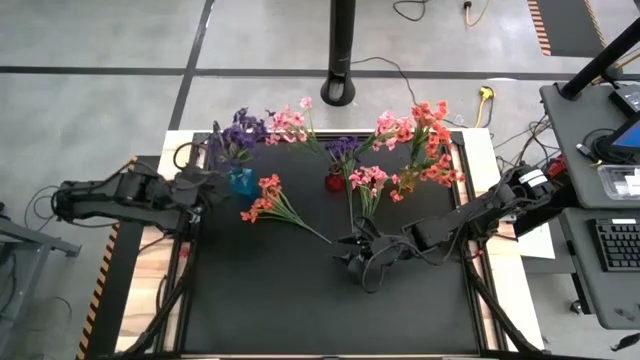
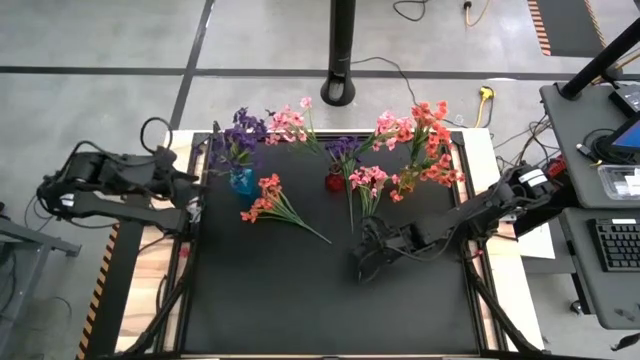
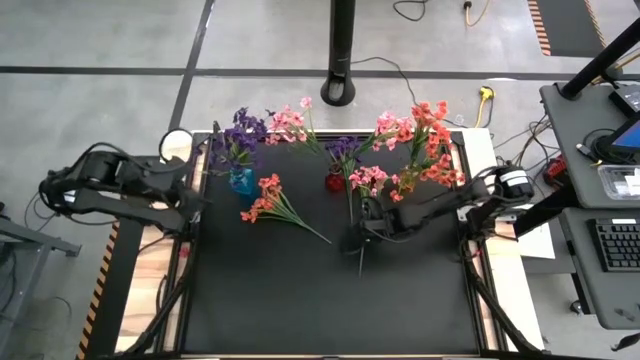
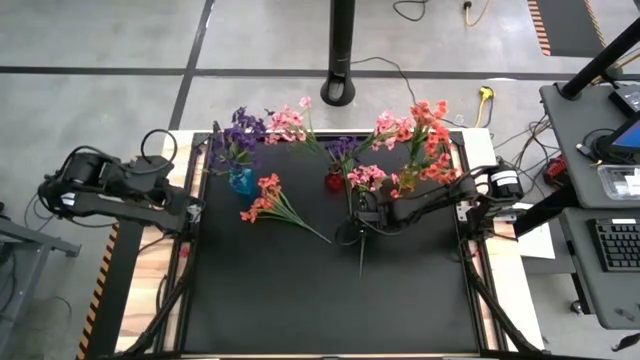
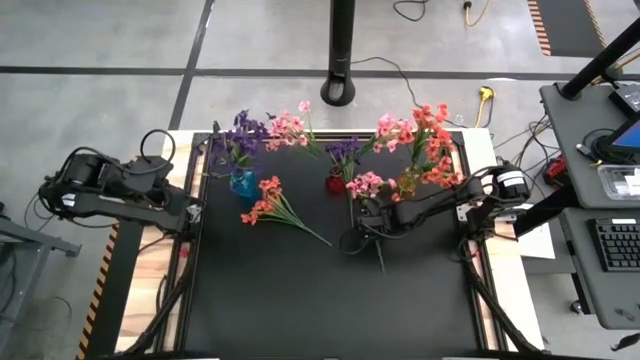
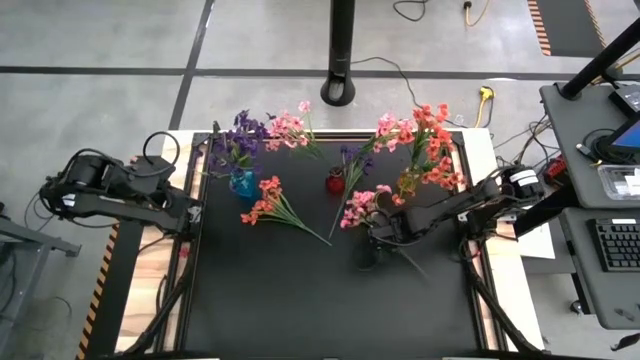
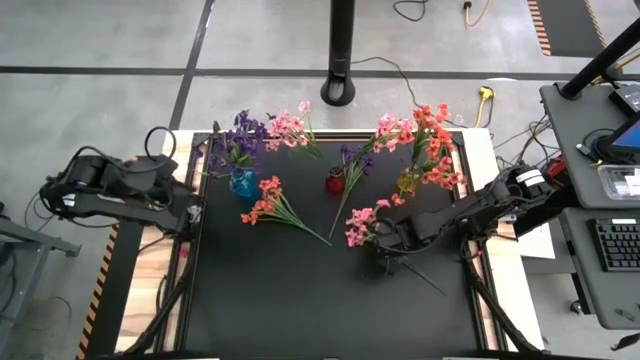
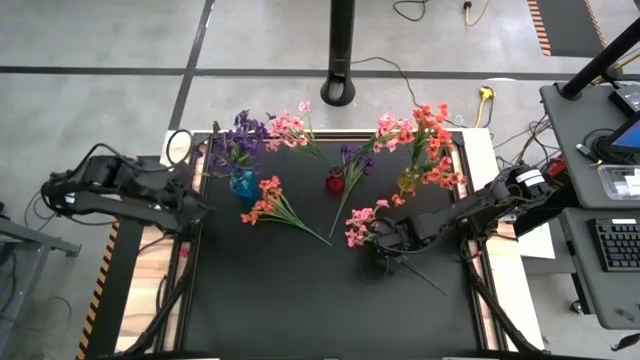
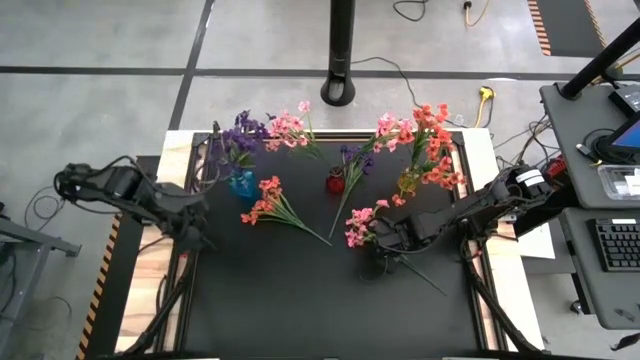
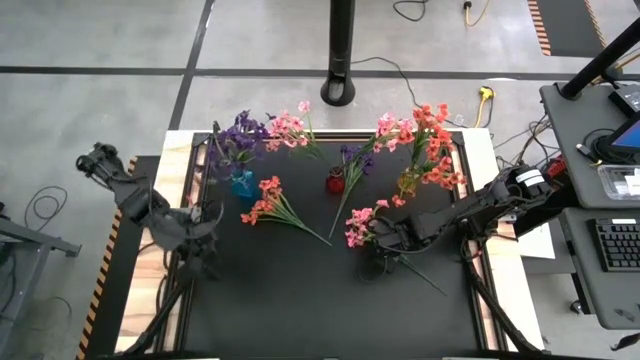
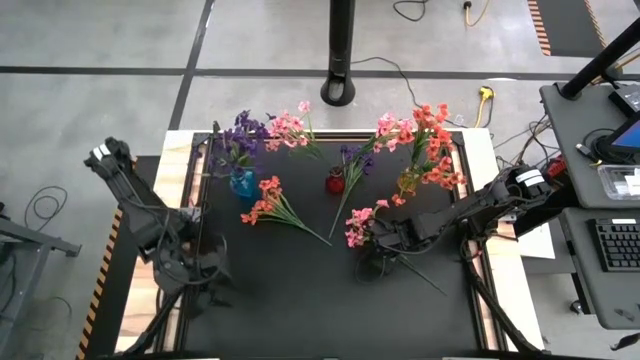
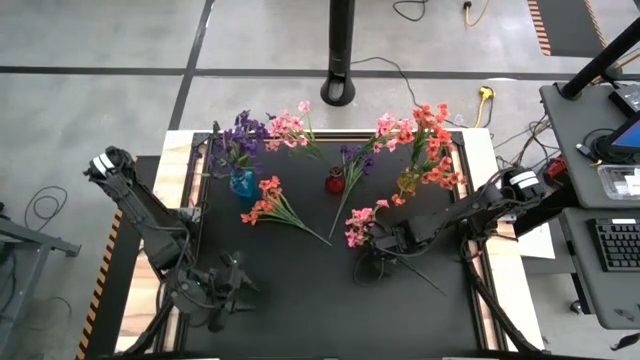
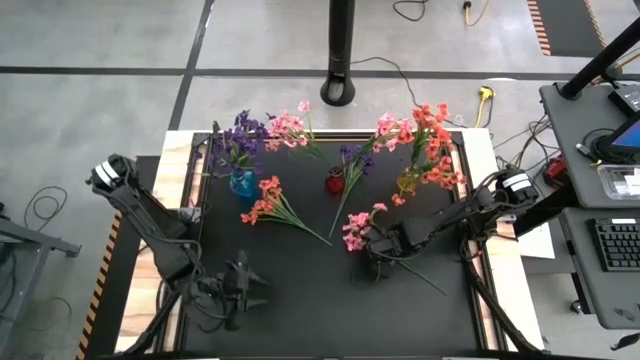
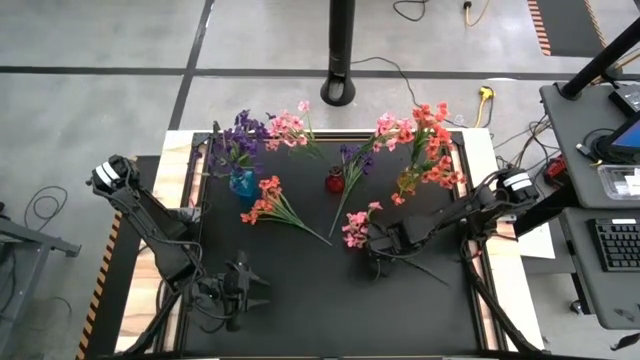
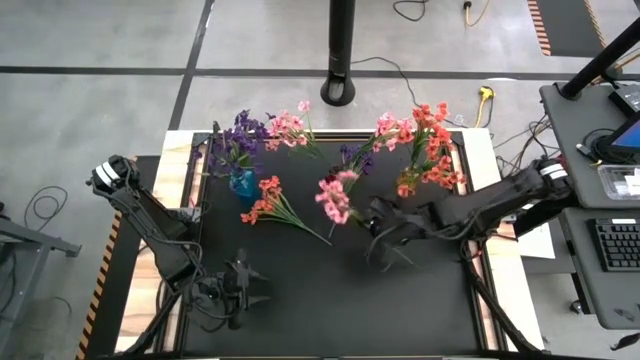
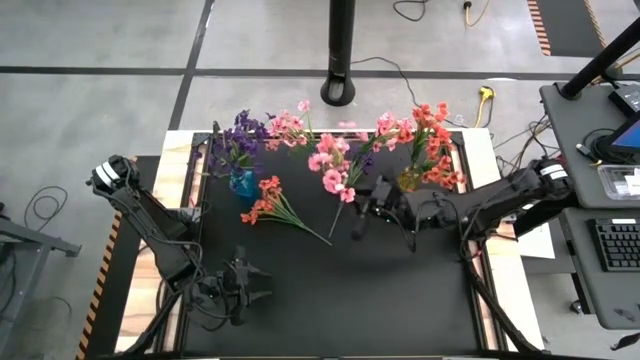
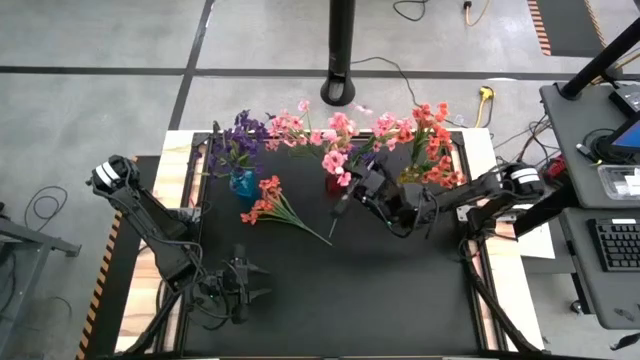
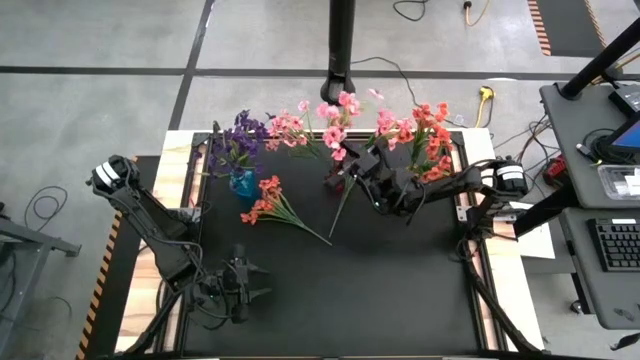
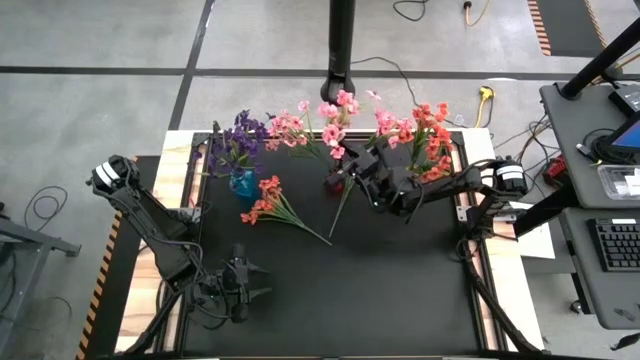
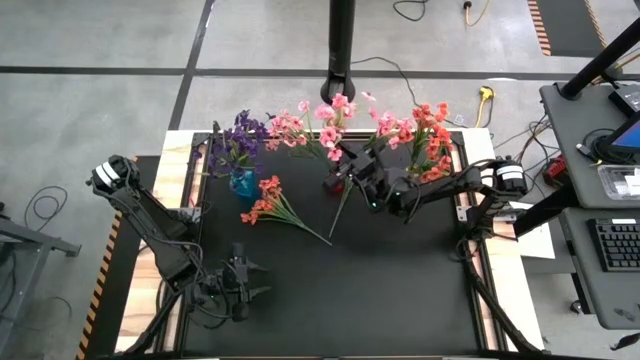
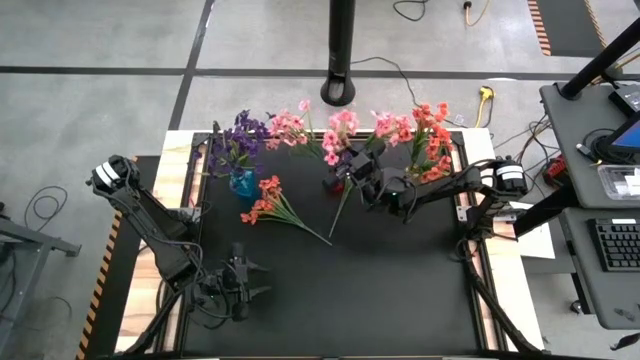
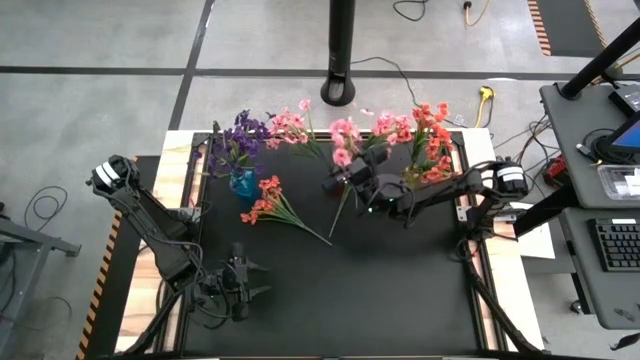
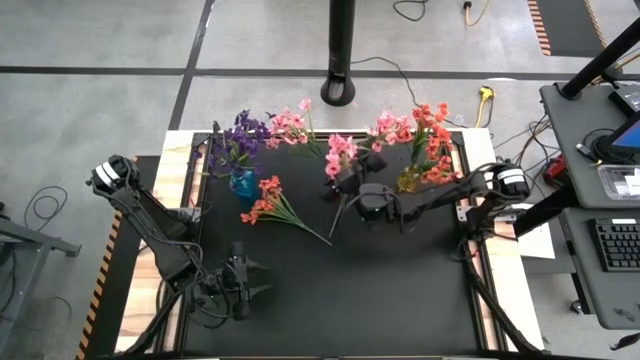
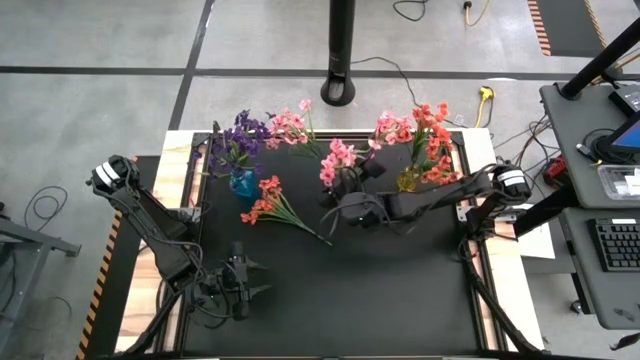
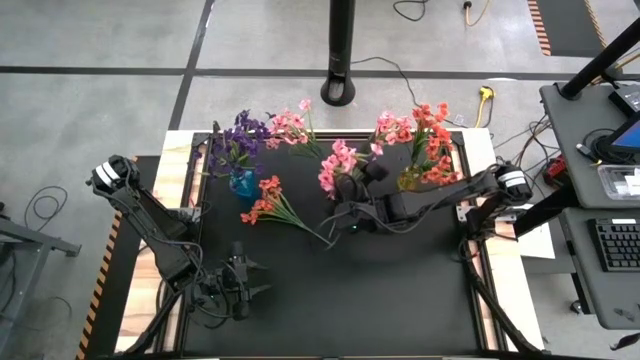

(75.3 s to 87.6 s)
Task: Sort flowers into vase by color
Put the pink flower into the red vase

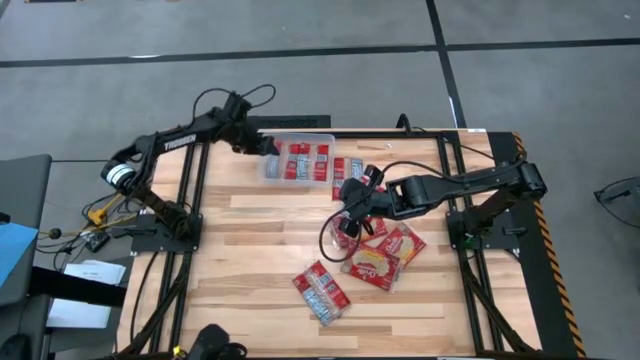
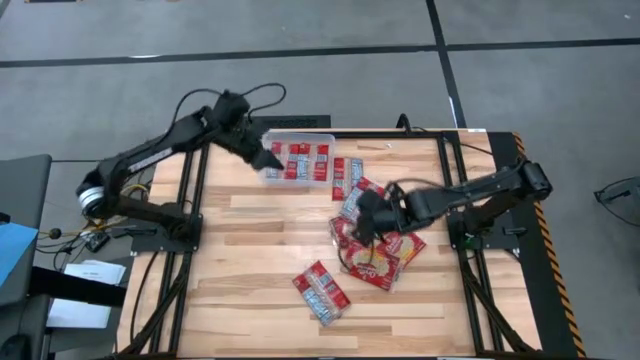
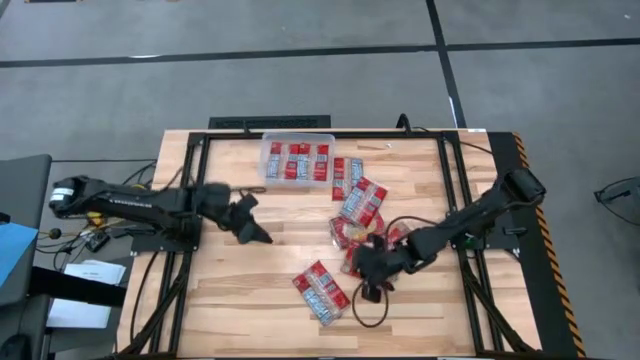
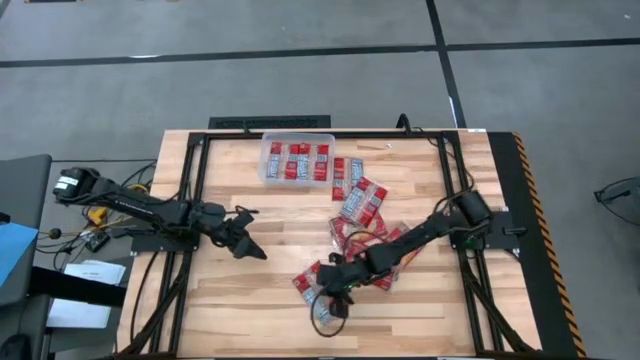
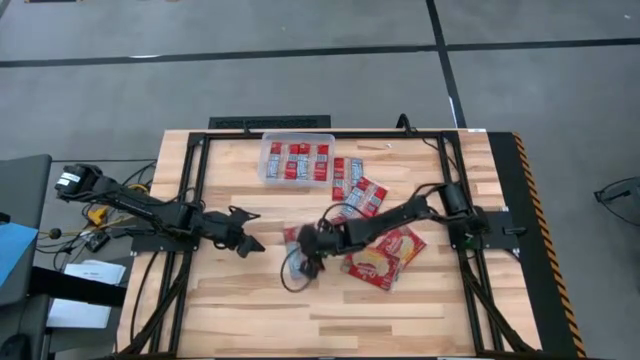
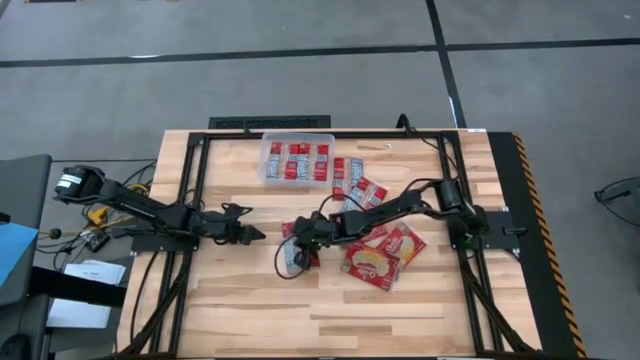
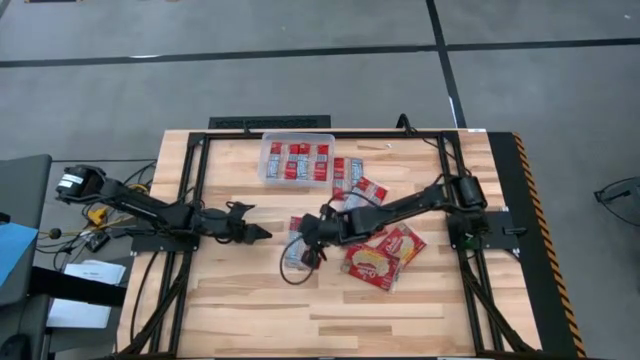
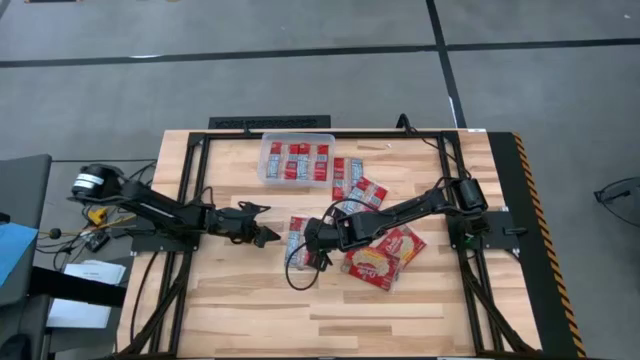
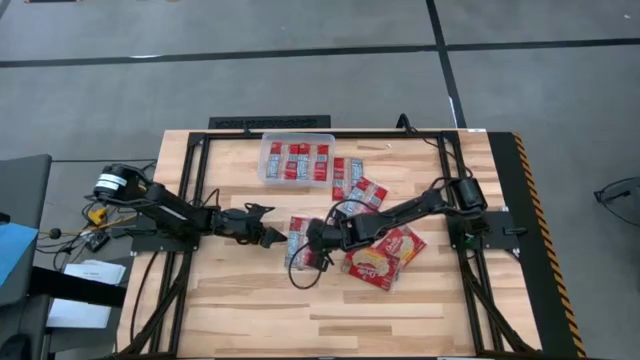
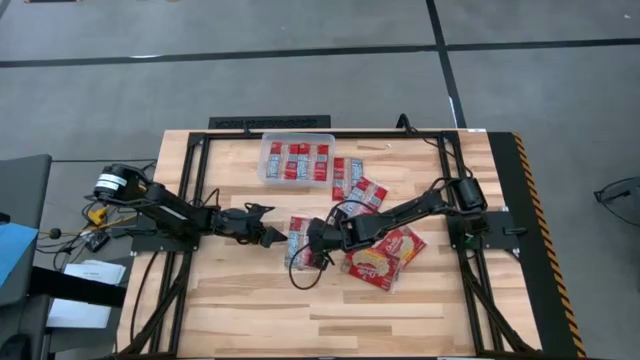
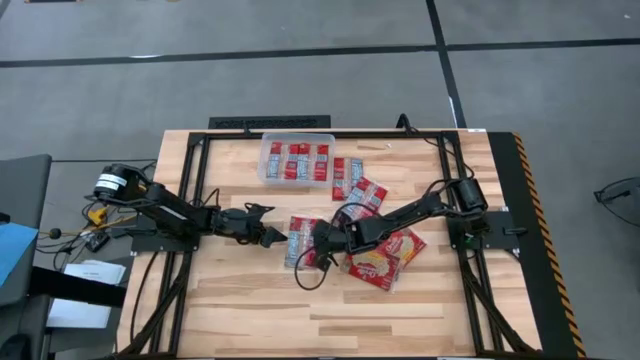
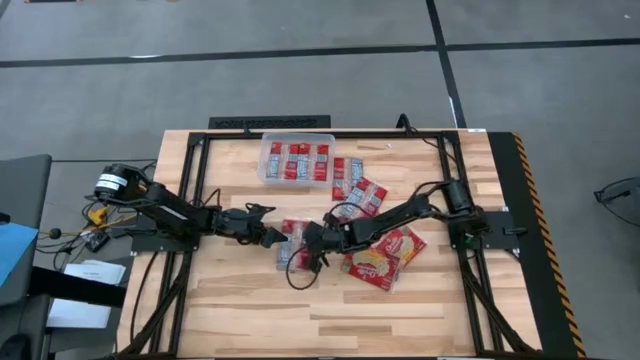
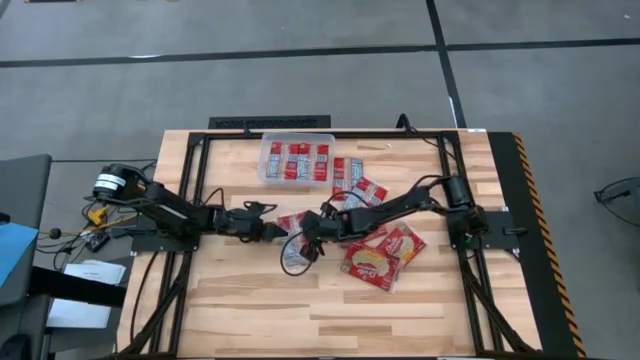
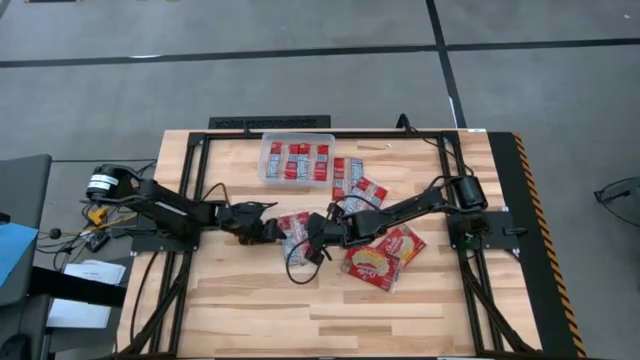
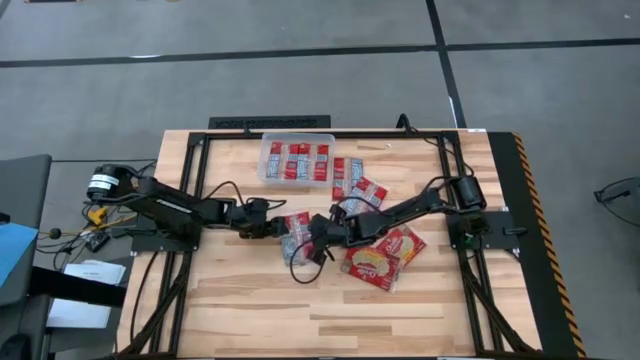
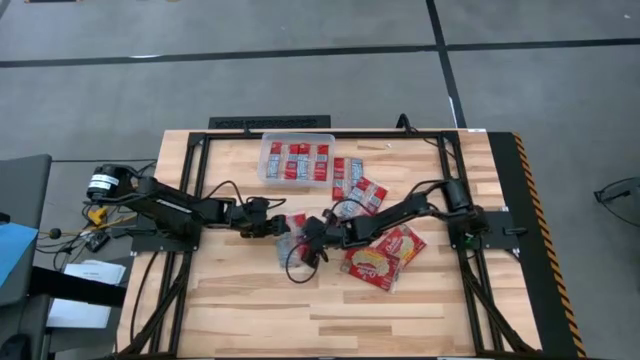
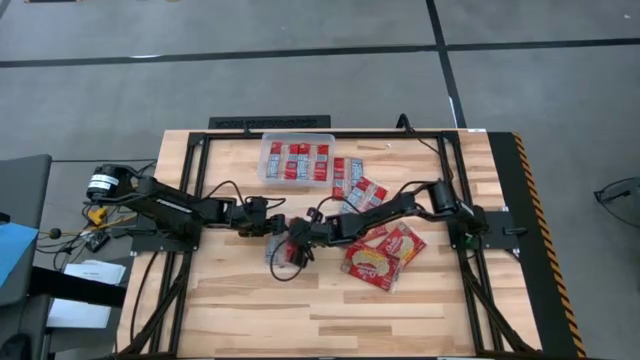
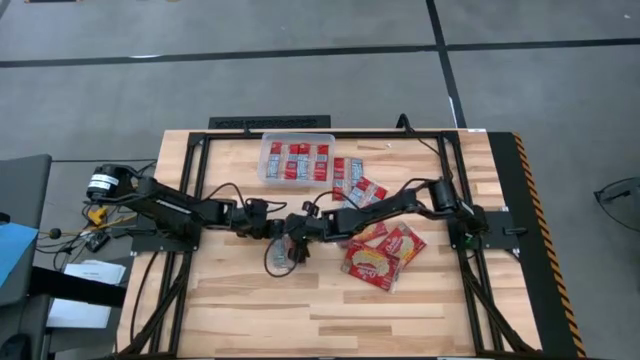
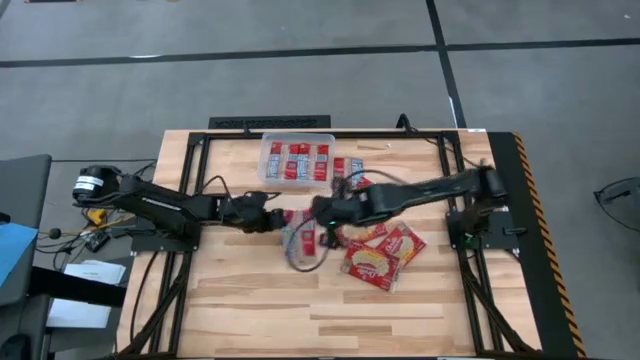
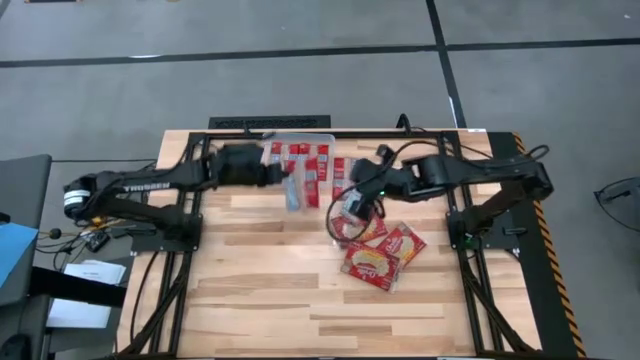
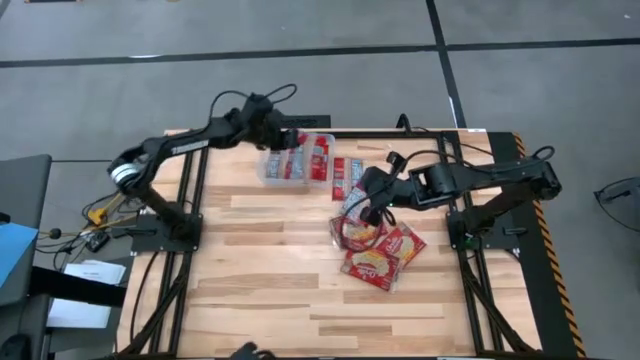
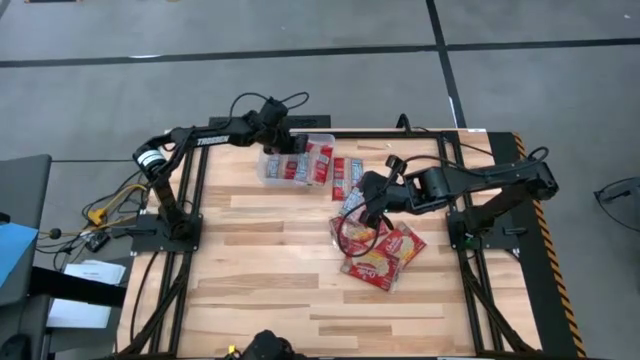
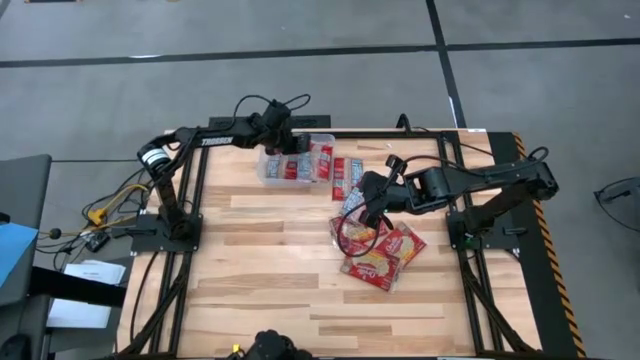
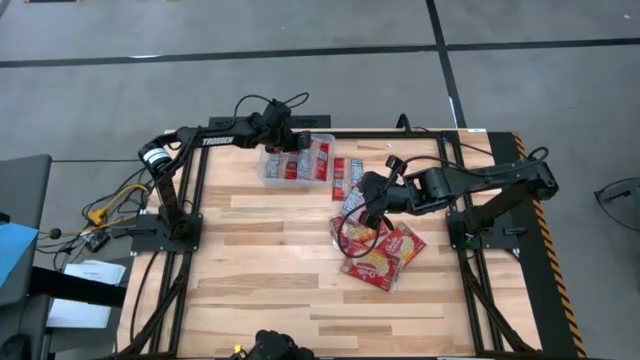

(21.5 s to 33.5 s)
Task: Sort popcorn bags into baskets
Put the red popcorn bag into the transparent bin
